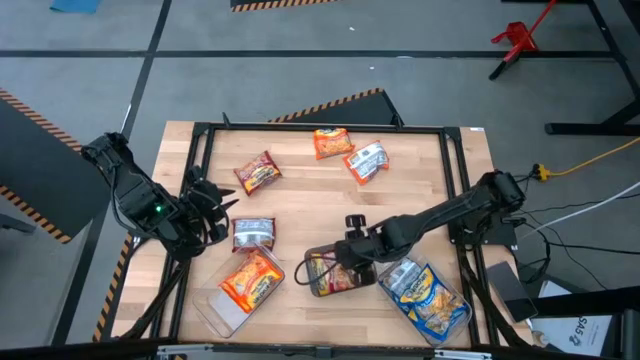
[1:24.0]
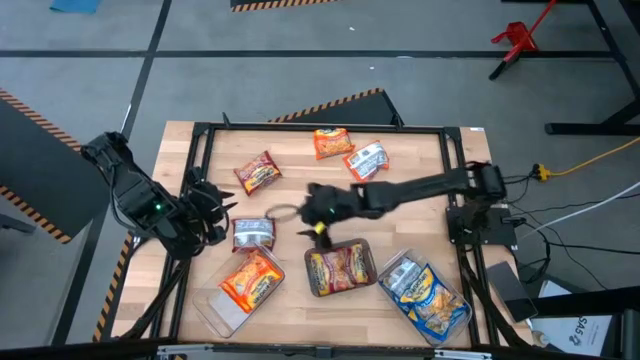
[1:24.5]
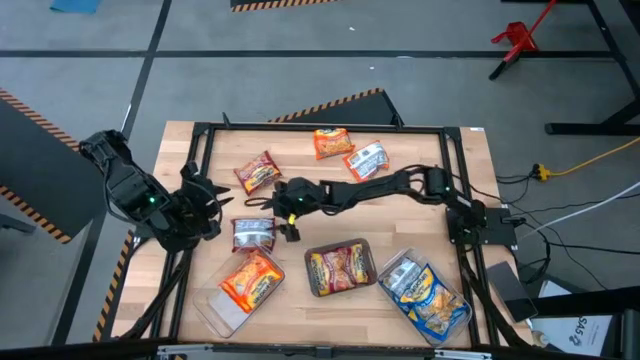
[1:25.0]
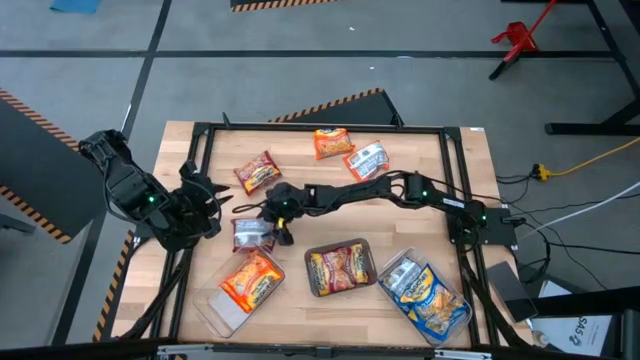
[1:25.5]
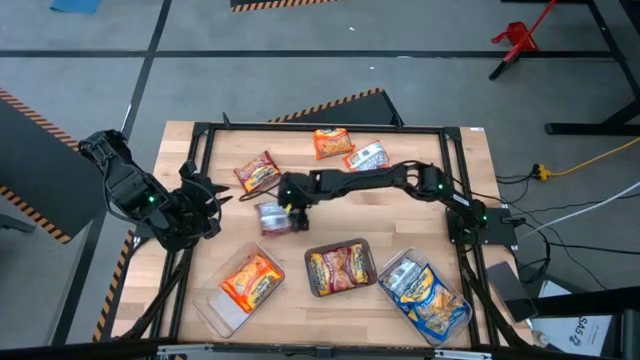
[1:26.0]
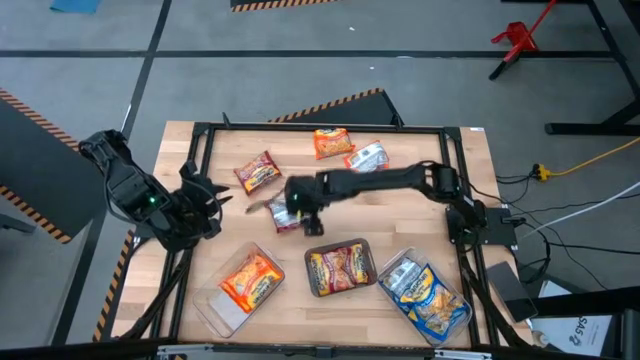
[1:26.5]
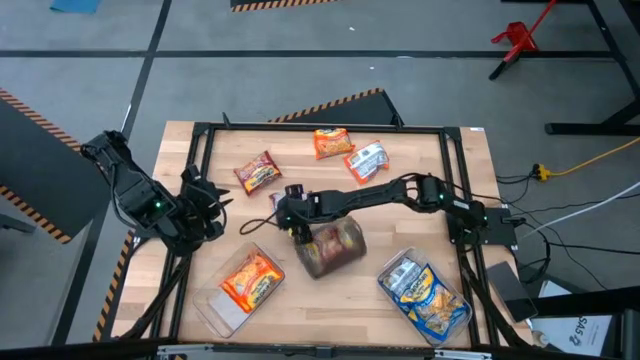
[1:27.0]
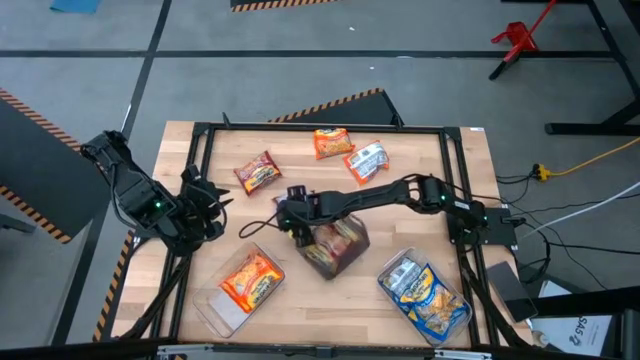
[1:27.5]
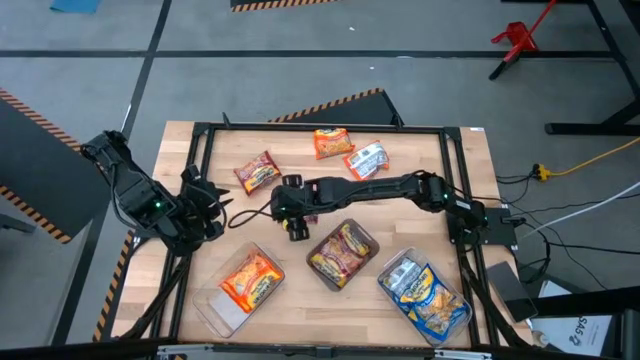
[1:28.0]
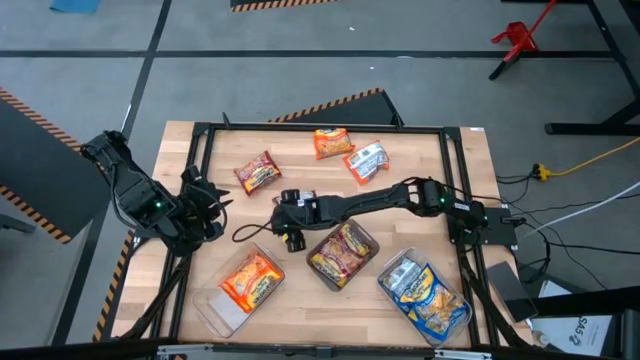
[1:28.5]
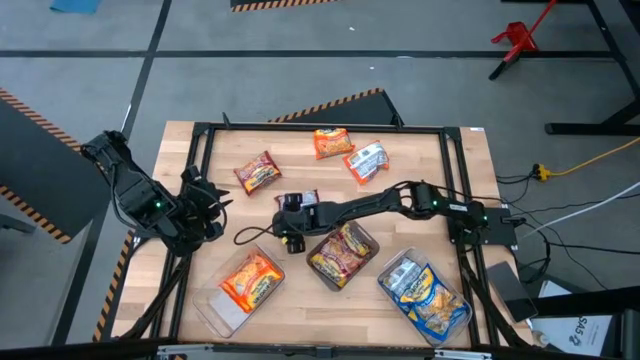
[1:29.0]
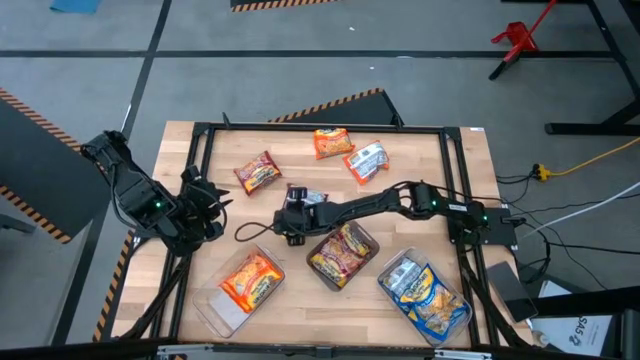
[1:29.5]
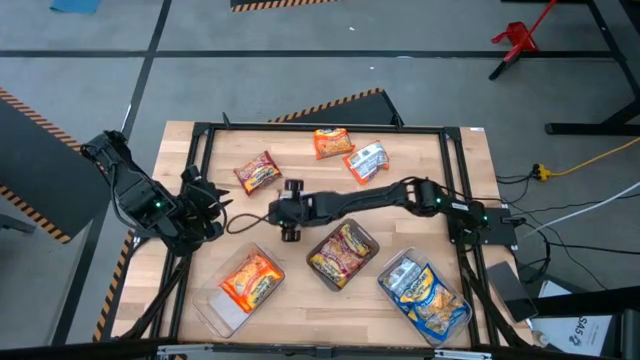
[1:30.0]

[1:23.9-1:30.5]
Task: Sort Maruchan noodles
Put the red noodle pack into the black bin

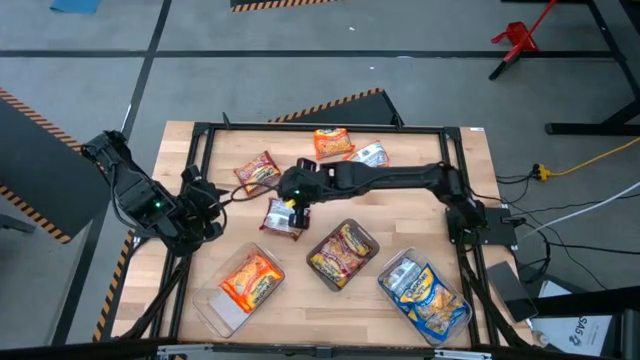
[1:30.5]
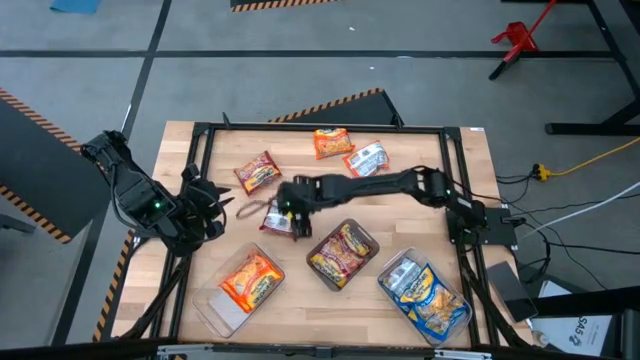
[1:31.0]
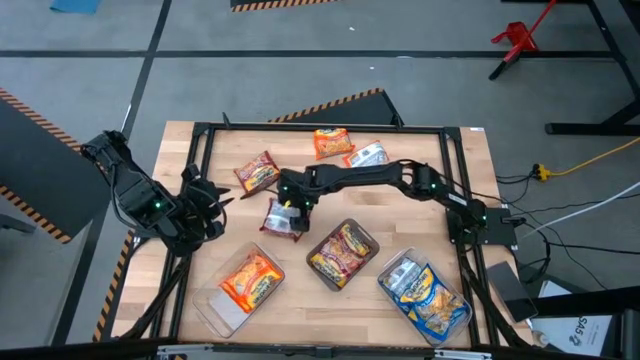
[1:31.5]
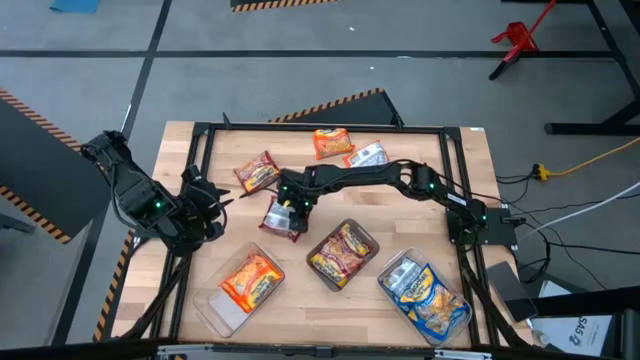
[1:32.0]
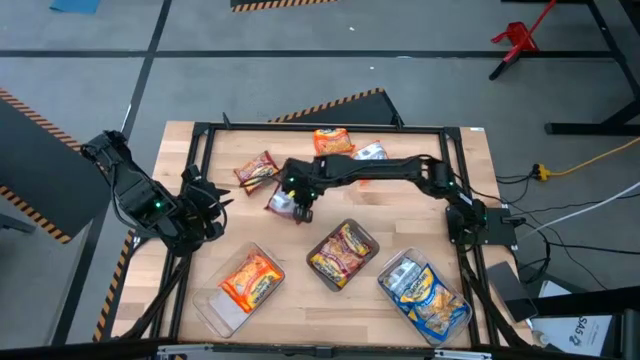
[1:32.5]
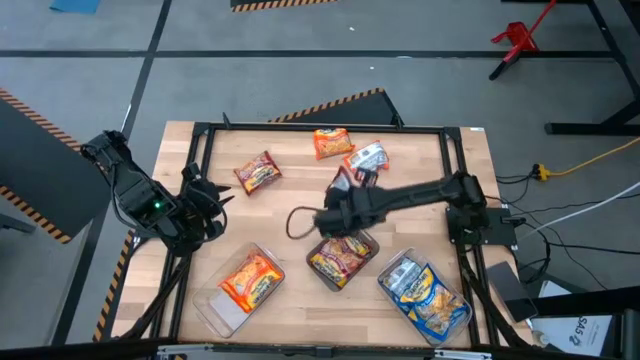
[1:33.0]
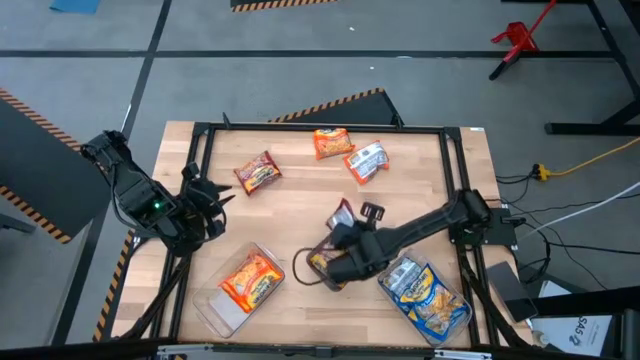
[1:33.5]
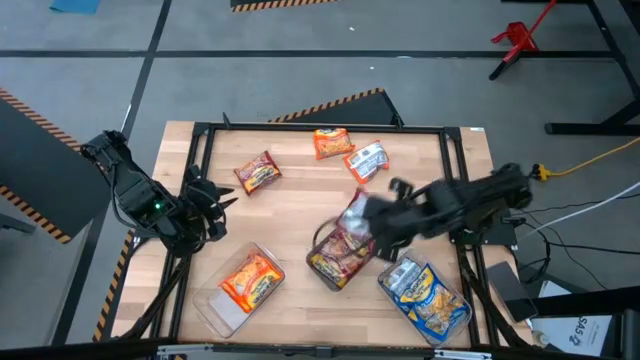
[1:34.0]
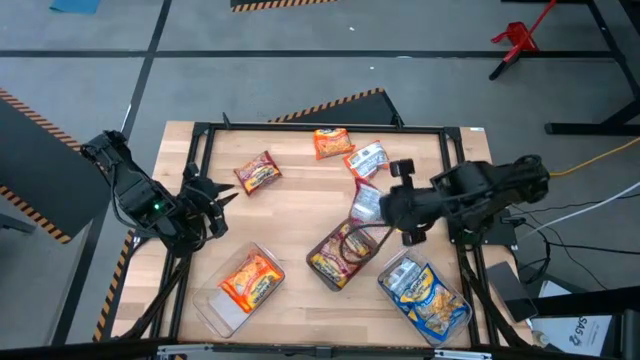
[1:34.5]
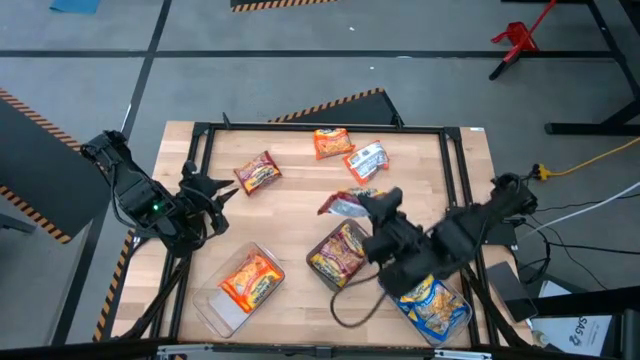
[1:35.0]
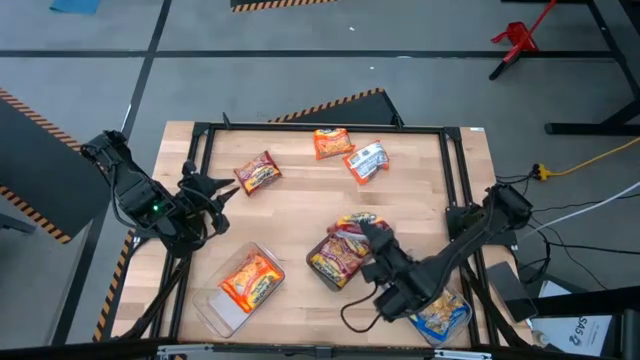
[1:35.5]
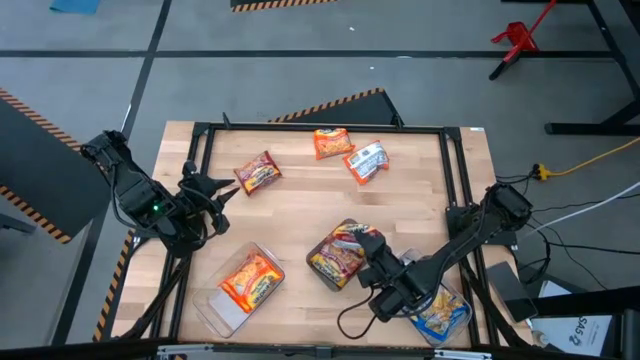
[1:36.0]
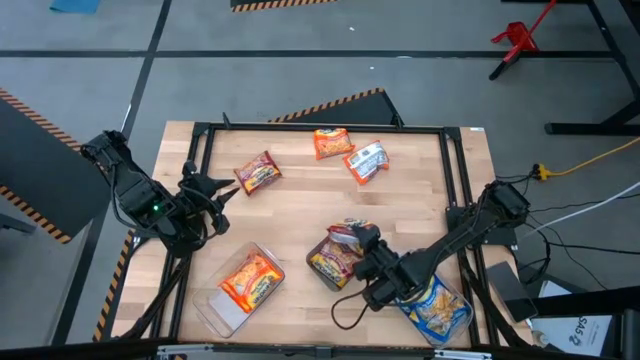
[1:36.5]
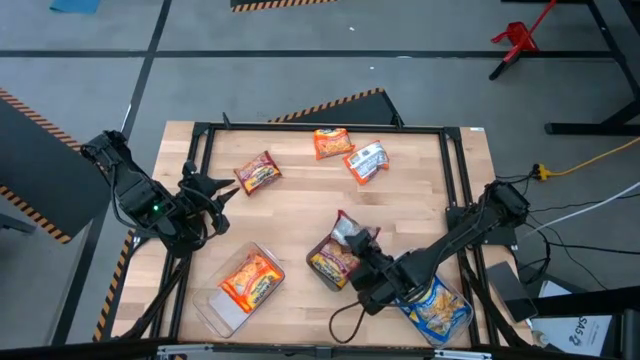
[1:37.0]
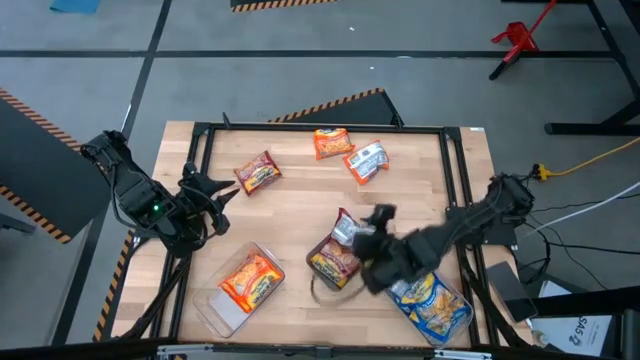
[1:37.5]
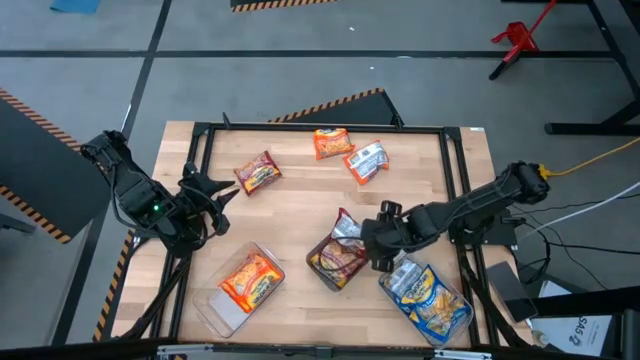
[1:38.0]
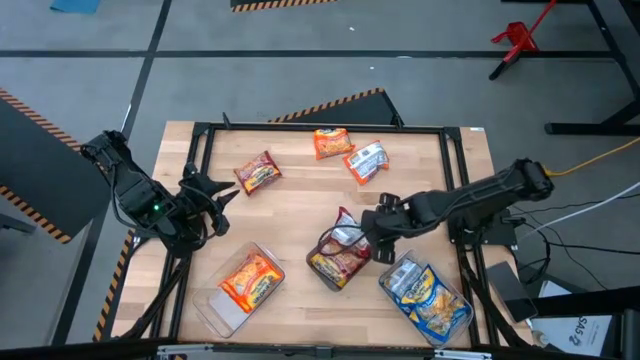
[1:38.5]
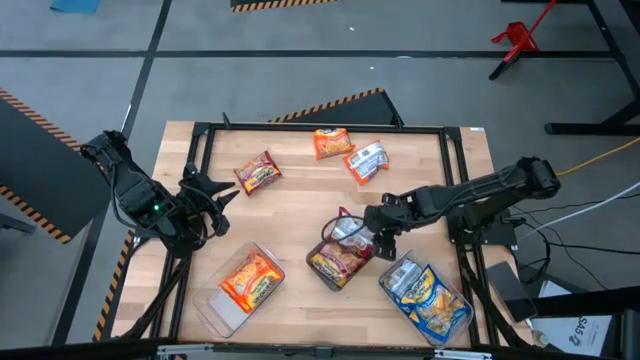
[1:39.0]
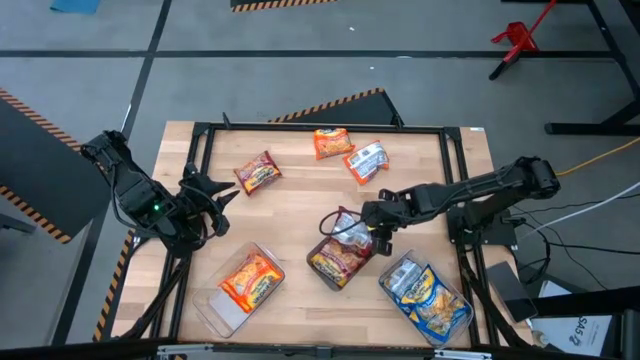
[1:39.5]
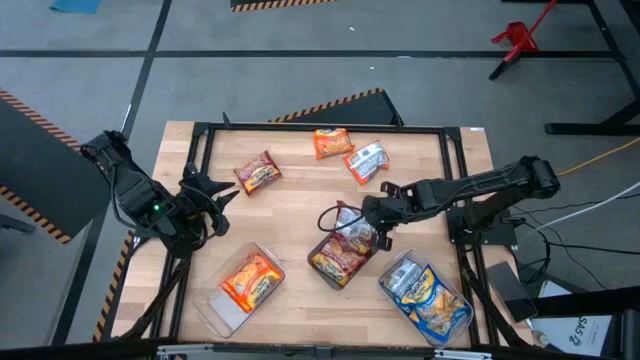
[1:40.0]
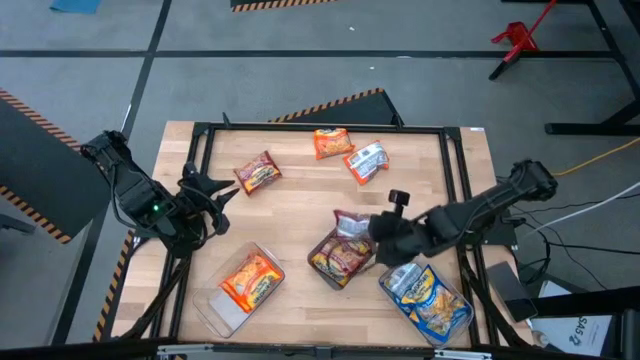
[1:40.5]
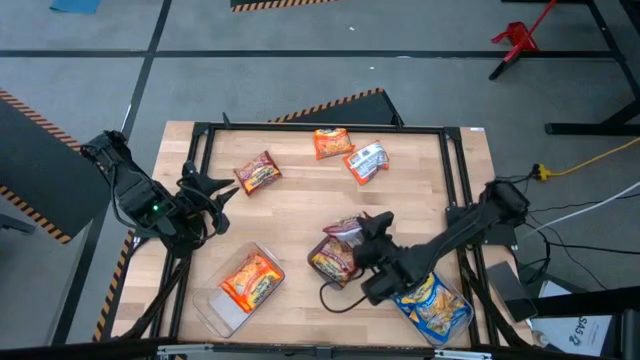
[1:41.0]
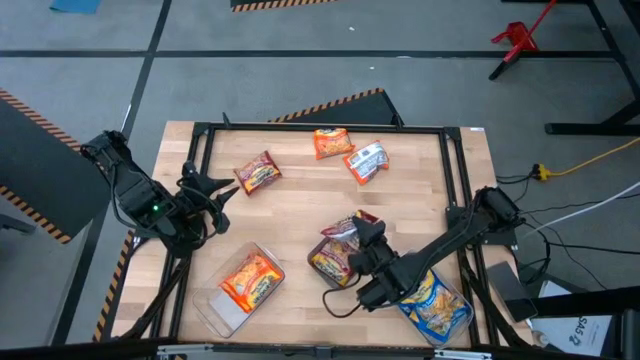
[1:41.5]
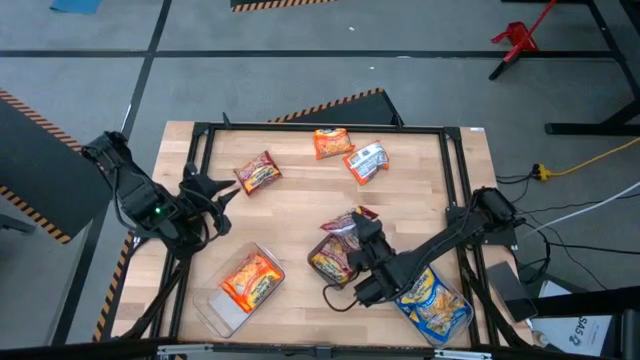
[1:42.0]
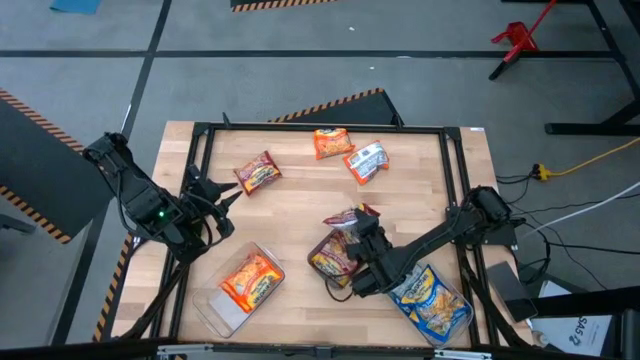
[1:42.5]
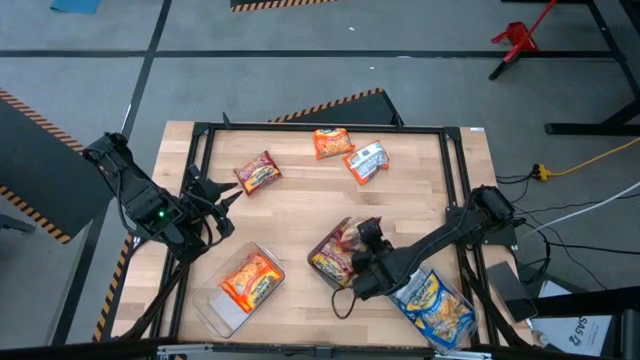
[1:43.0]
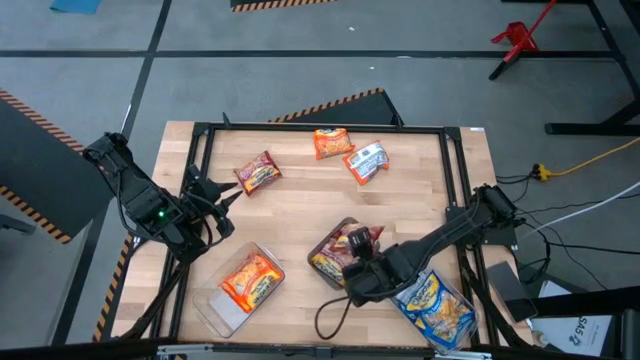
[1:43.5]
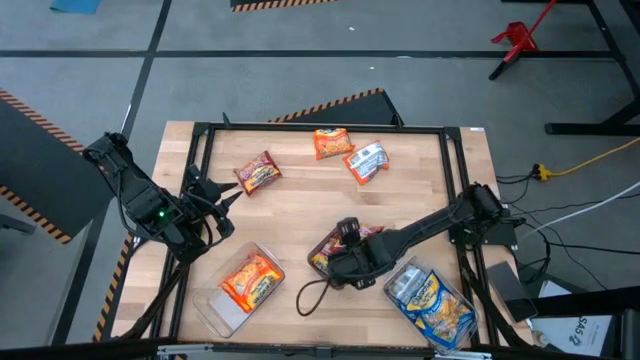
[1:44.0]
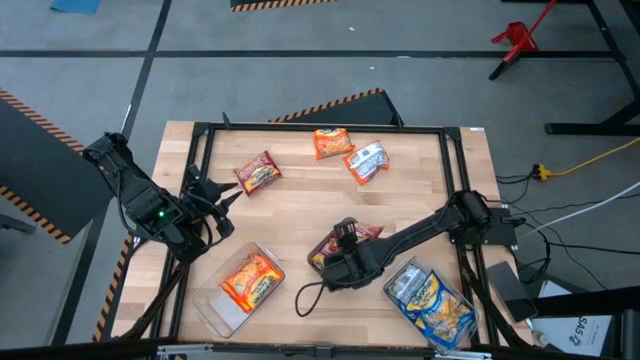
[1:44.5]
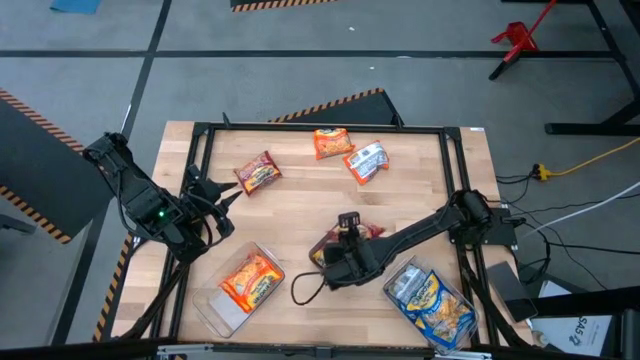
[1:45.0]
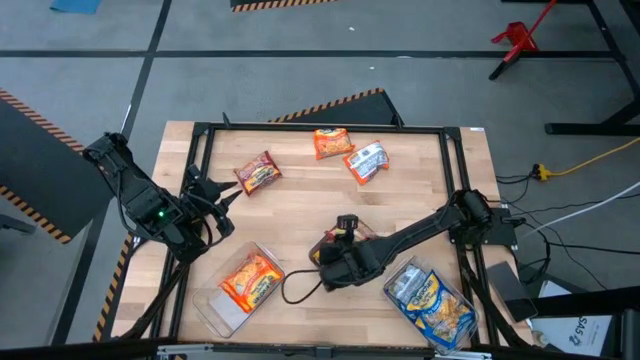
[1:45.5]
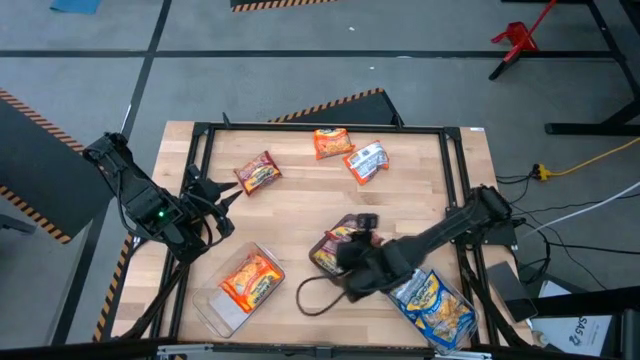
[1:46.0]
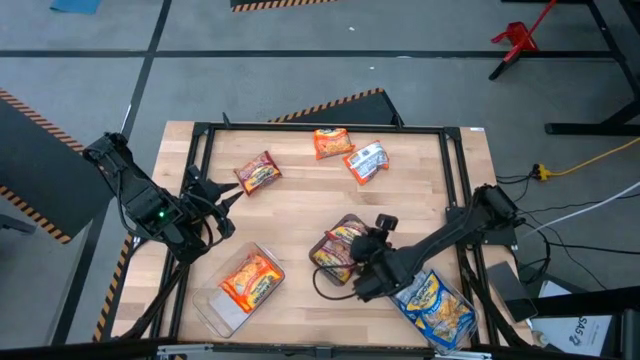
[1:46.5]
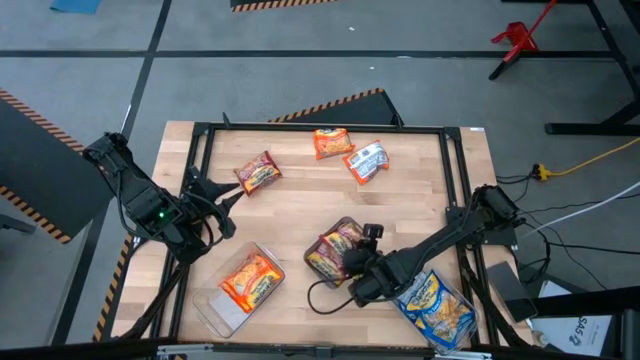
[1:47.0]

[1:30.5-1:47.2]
Put the red noodle pack into the black bin
